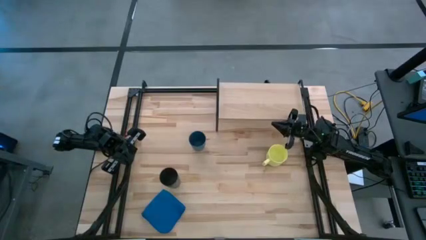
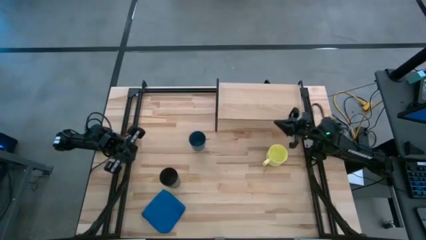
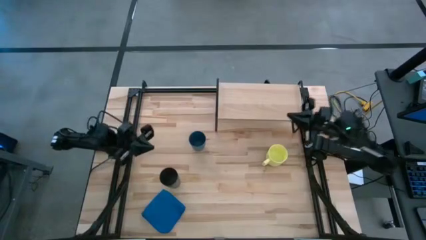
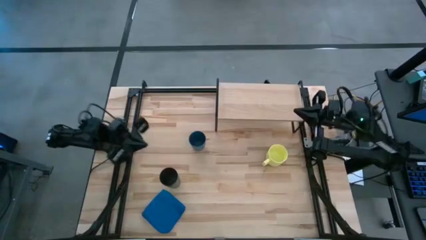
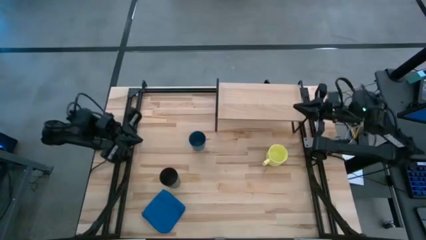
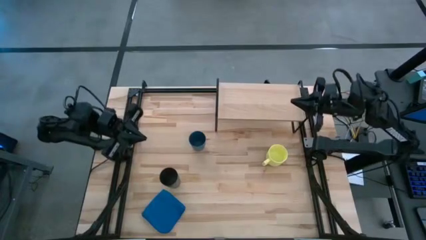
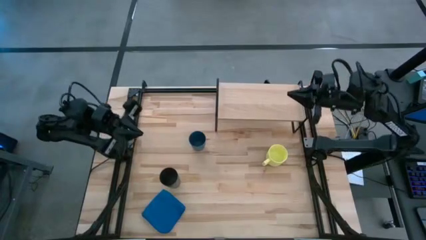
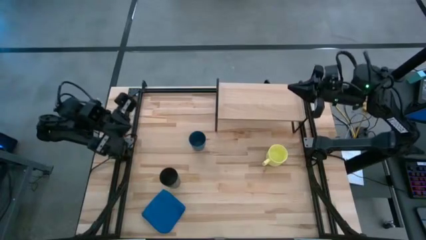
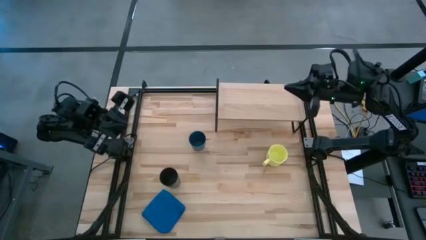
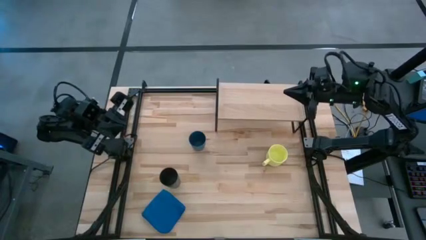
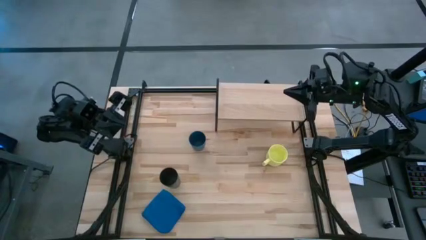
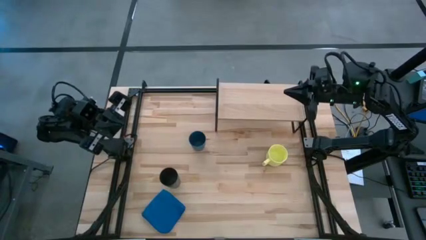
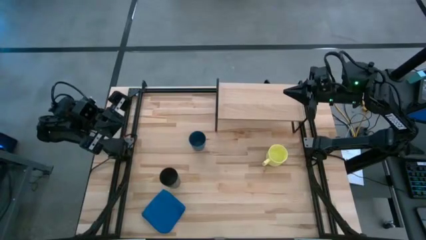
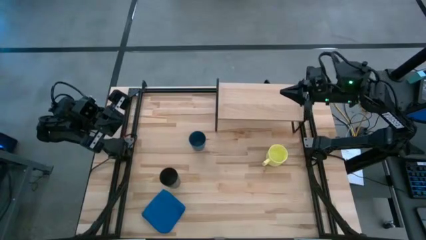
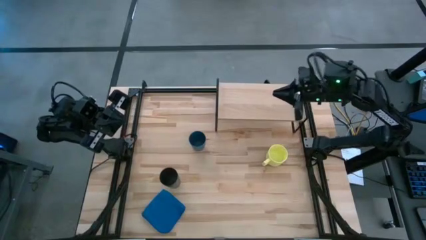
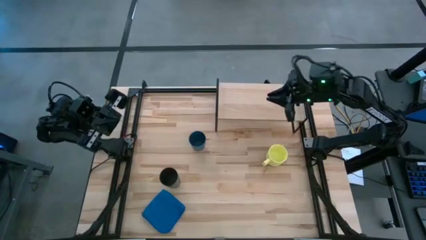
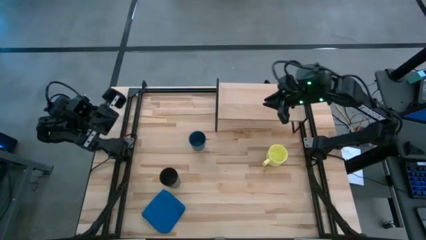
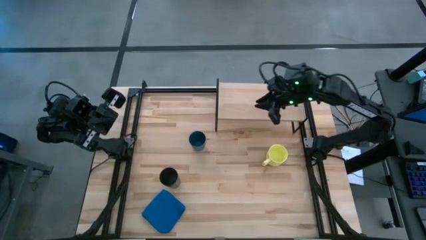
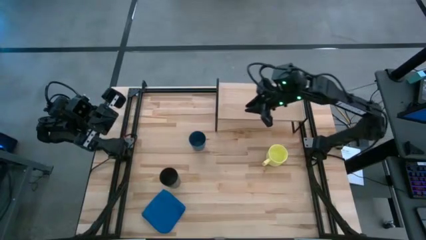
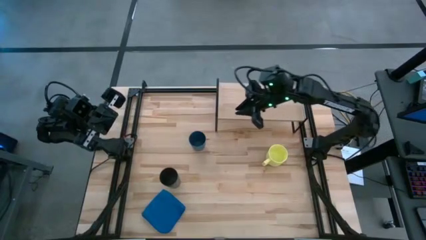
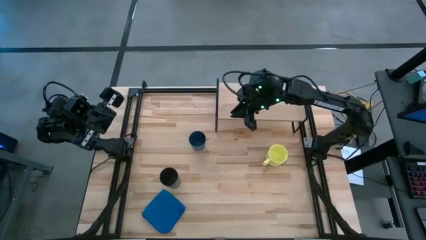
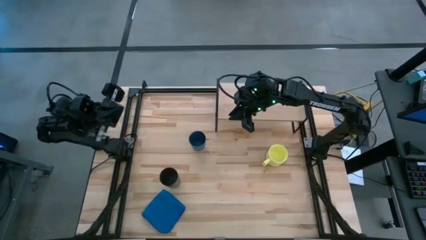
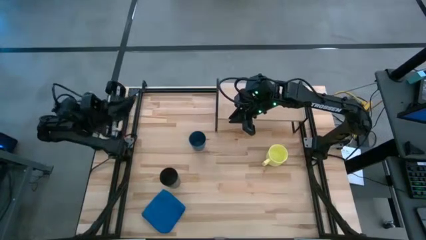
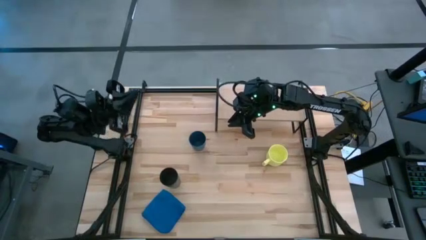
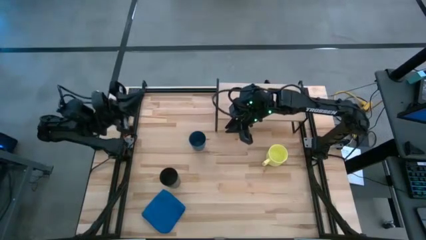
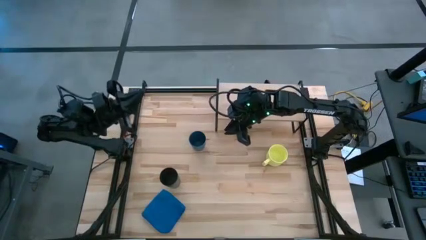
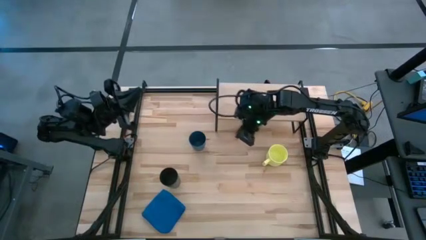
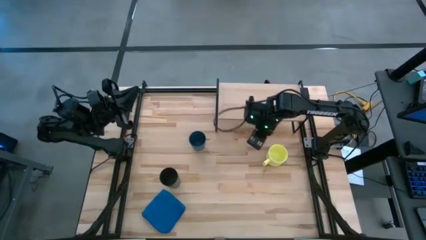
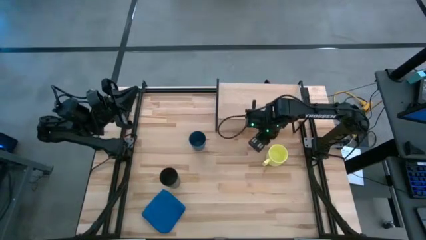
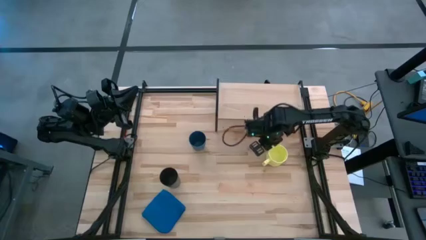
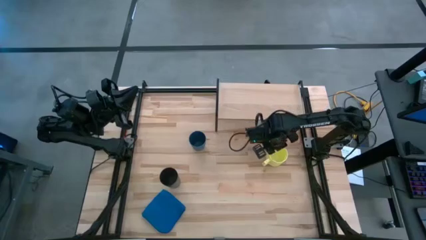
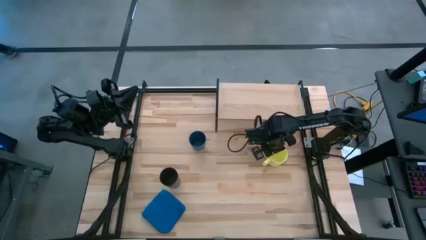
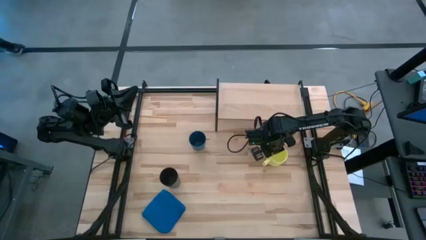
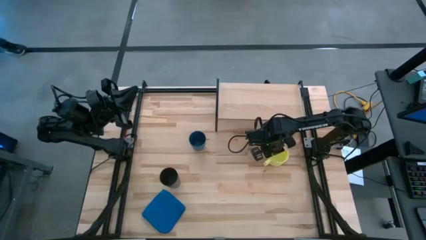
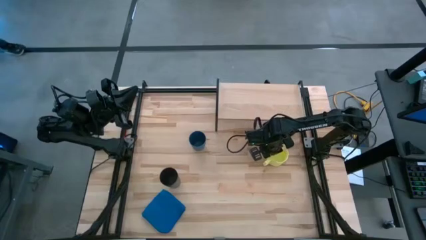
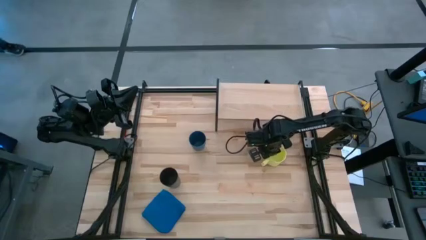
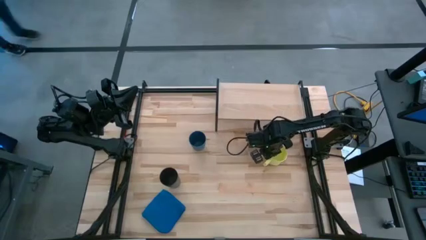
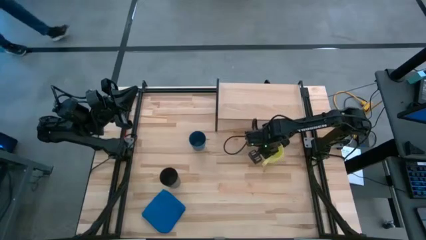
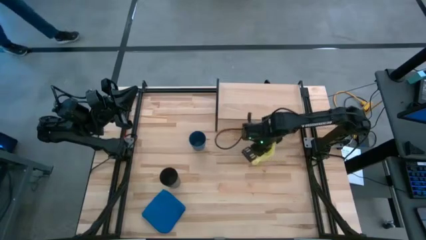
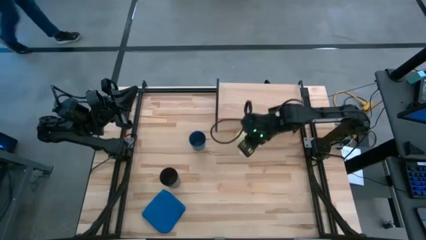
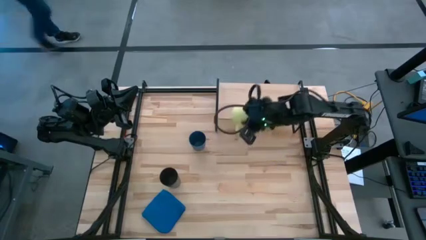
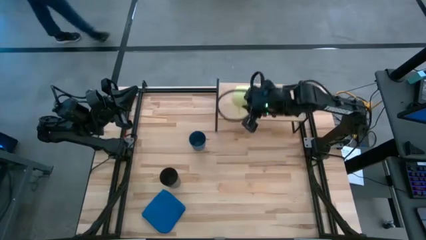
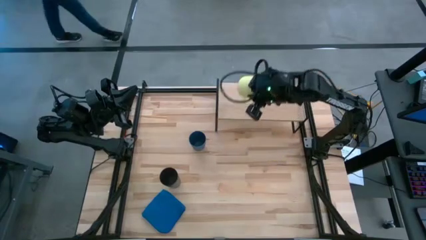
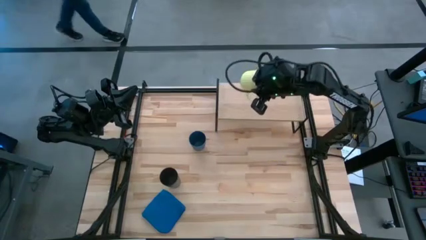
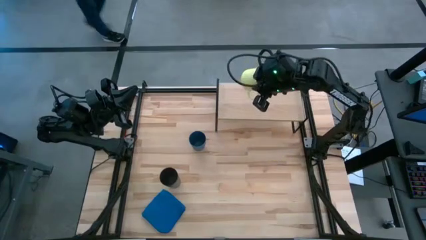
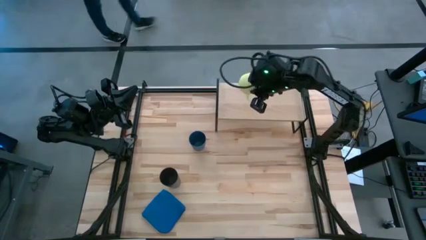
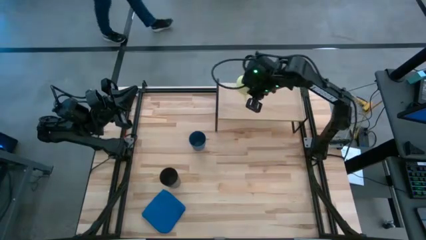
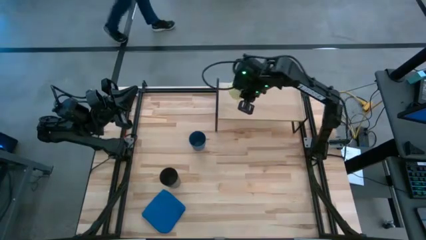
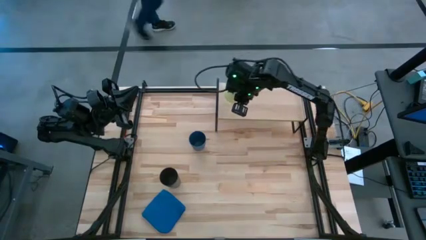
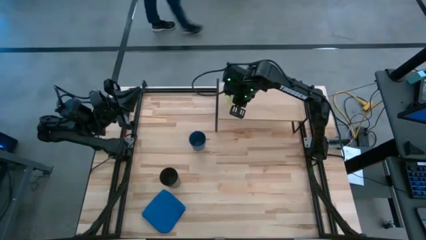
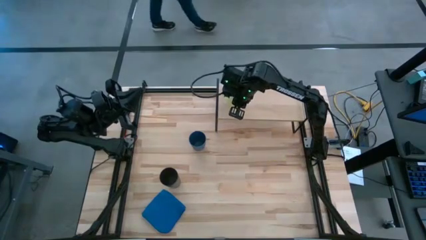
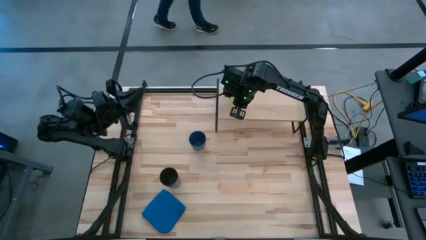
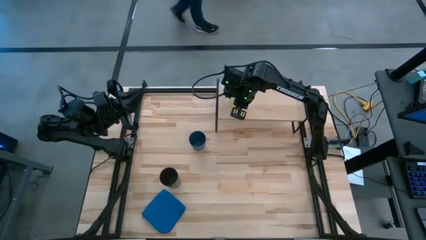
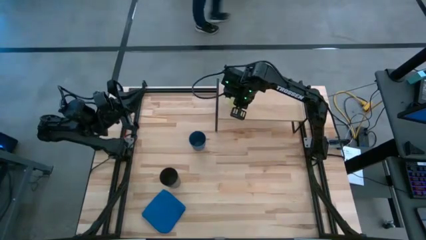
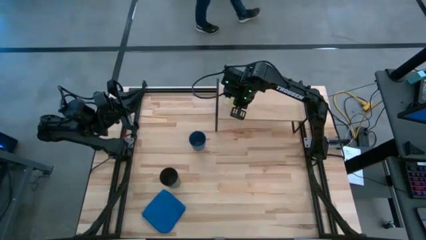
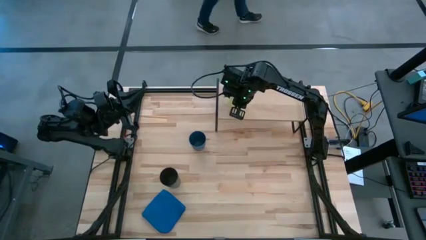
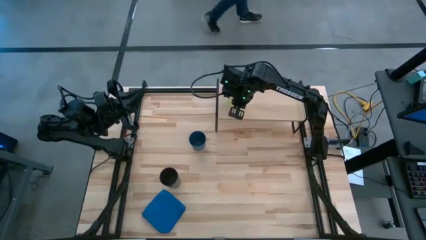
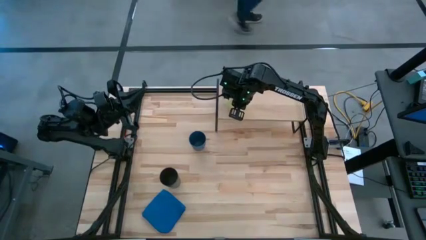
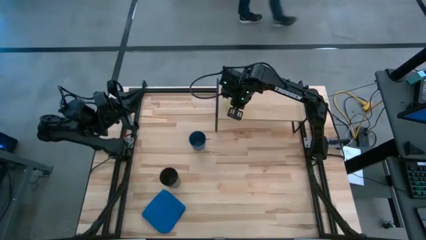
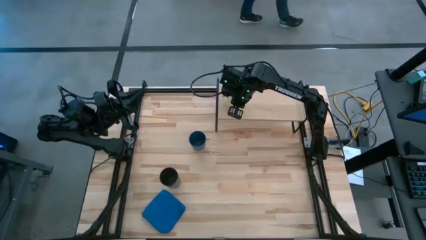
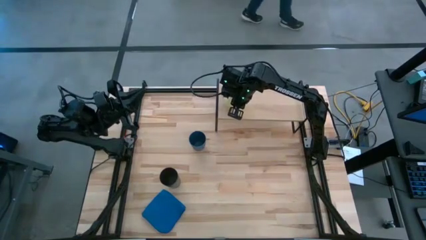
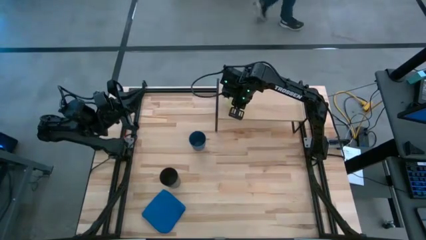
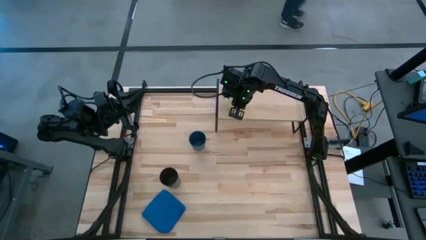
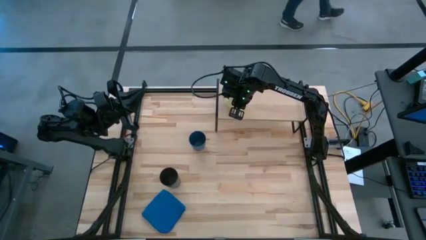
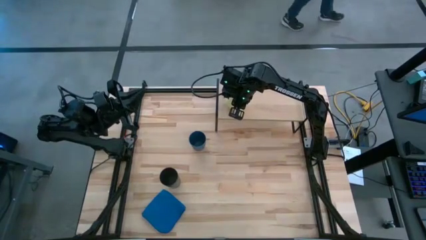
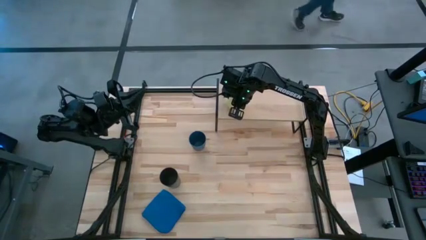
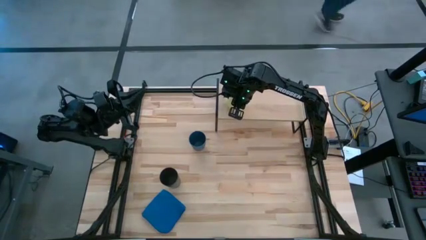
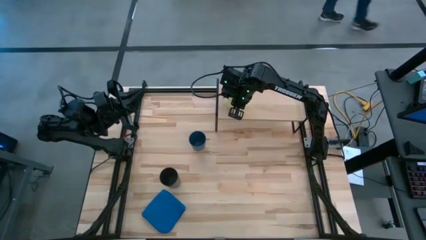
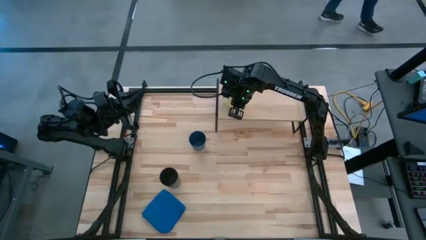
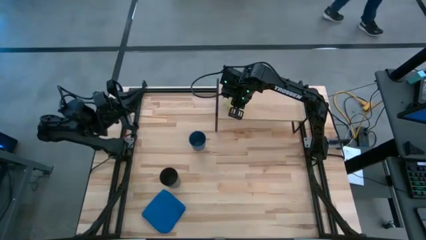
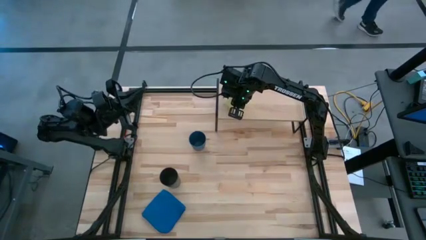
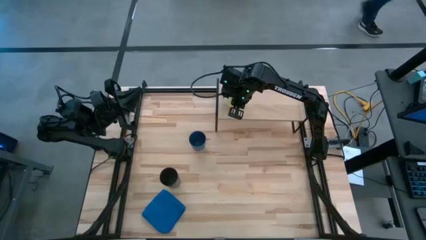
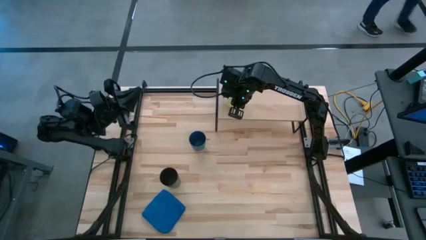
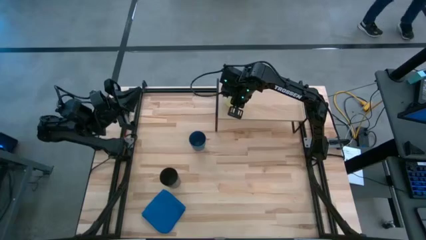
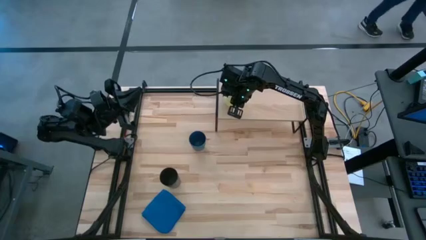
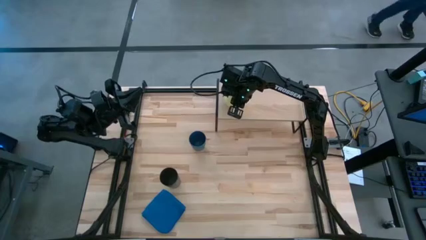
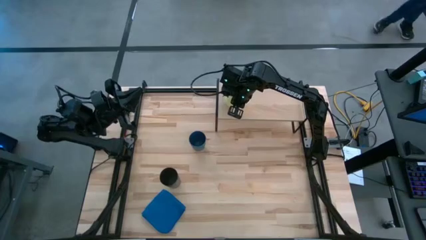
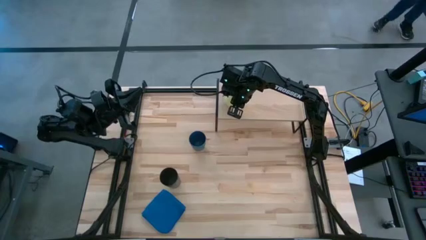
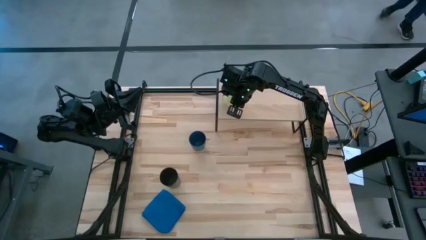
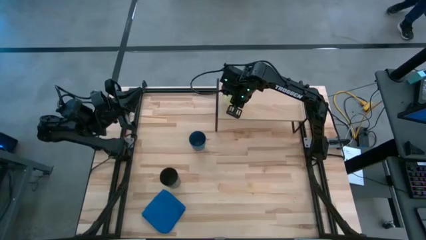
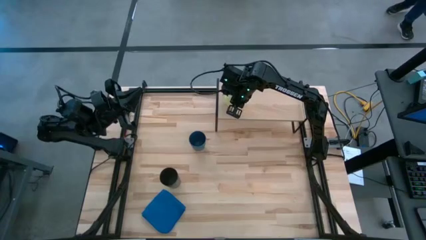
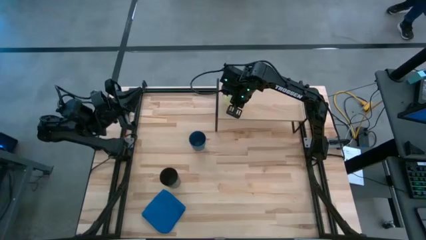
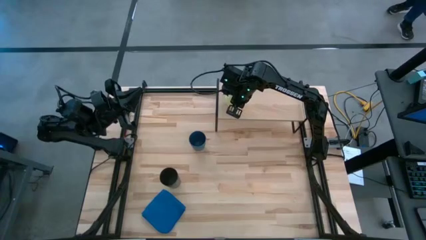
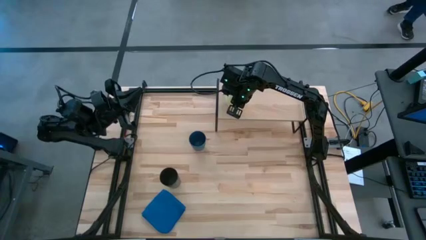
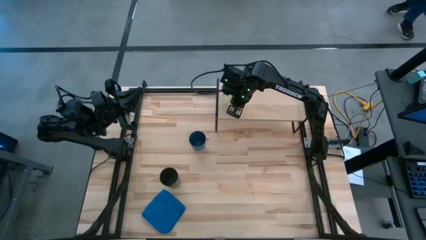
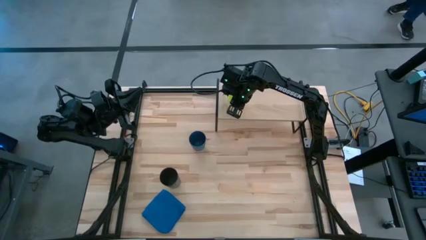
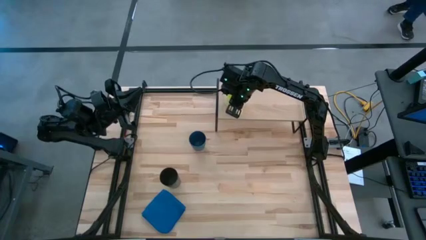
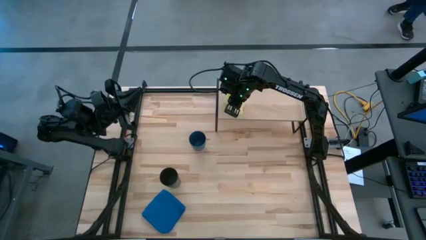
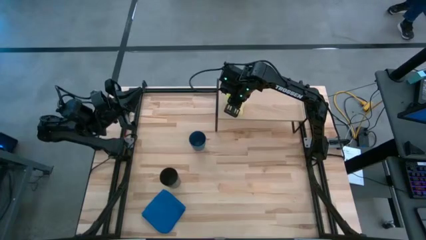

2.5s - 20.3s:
Task: Stack small to large cups/mugs on shelf
Put the yellow mug on the shelf
